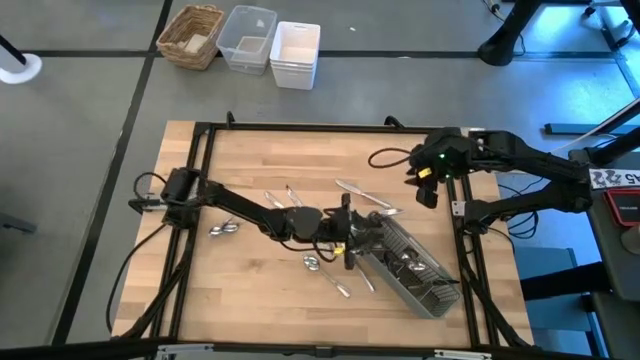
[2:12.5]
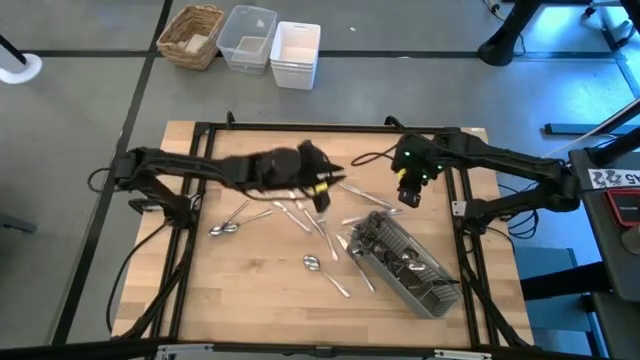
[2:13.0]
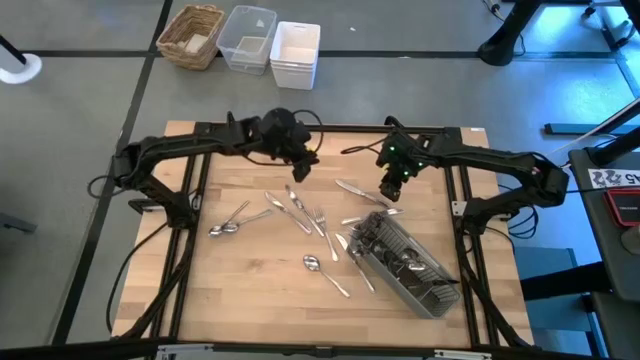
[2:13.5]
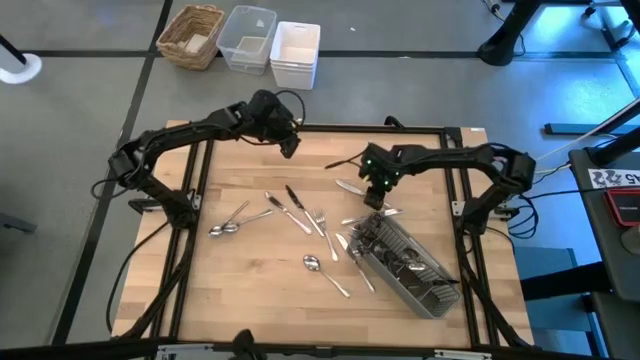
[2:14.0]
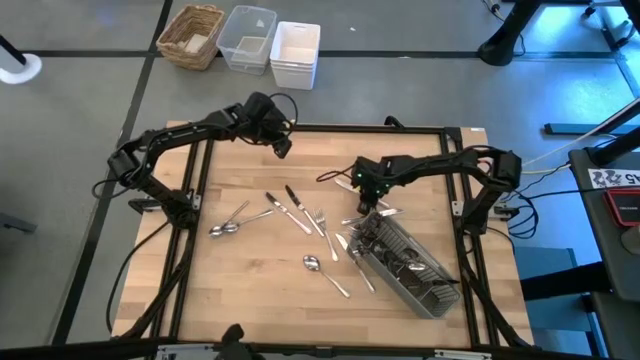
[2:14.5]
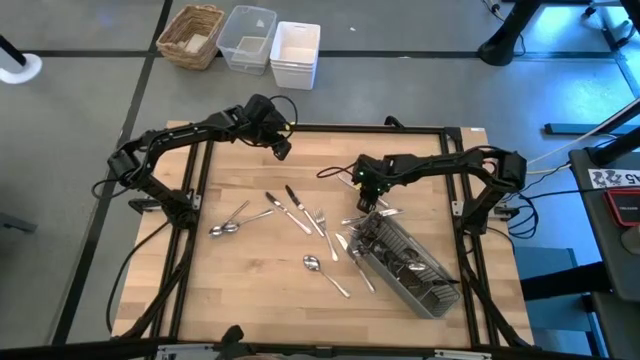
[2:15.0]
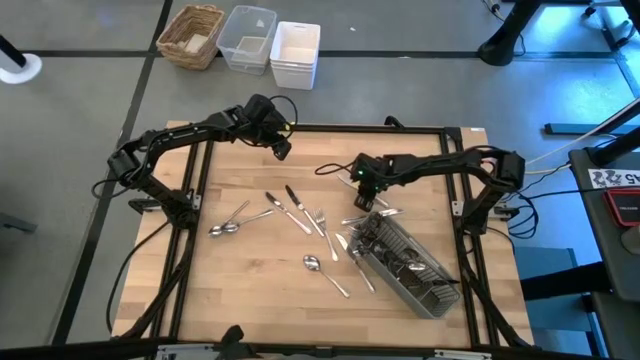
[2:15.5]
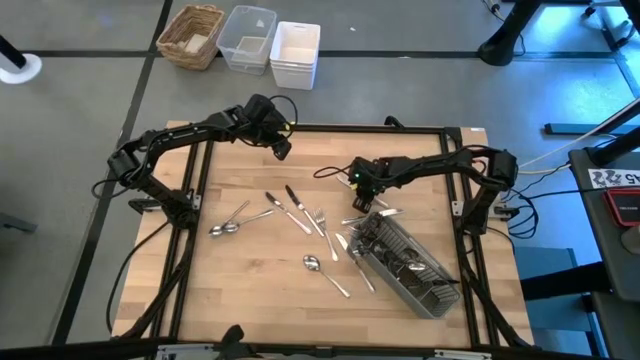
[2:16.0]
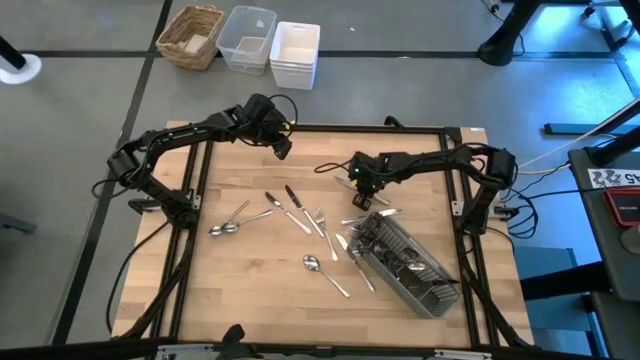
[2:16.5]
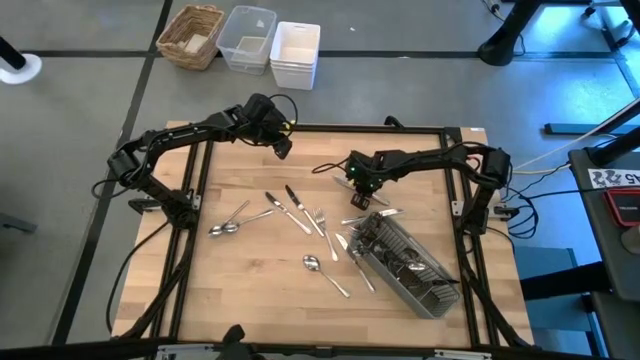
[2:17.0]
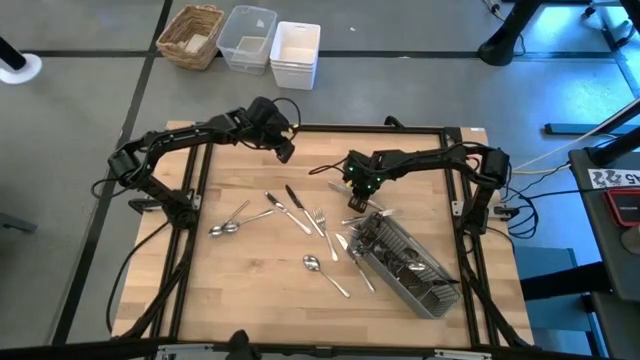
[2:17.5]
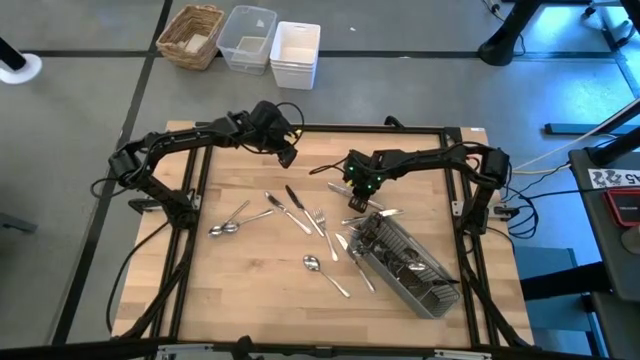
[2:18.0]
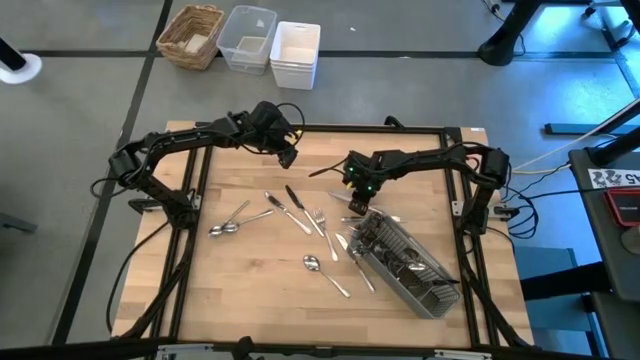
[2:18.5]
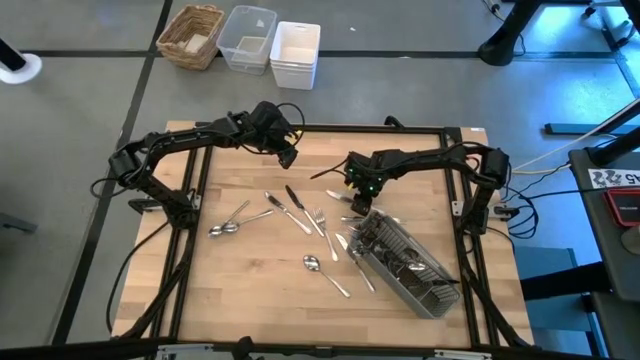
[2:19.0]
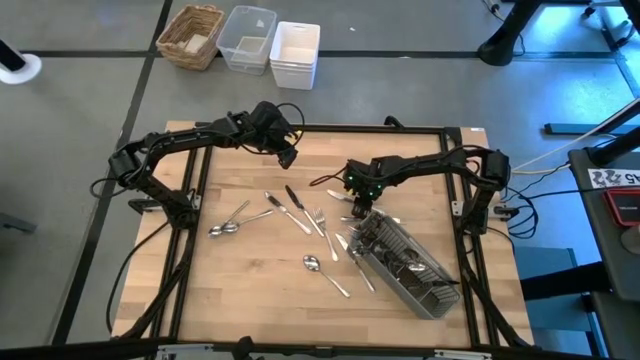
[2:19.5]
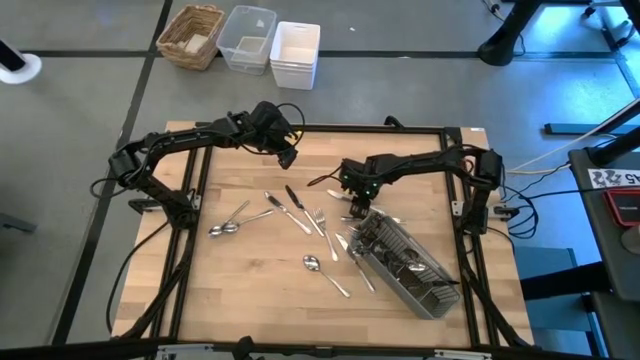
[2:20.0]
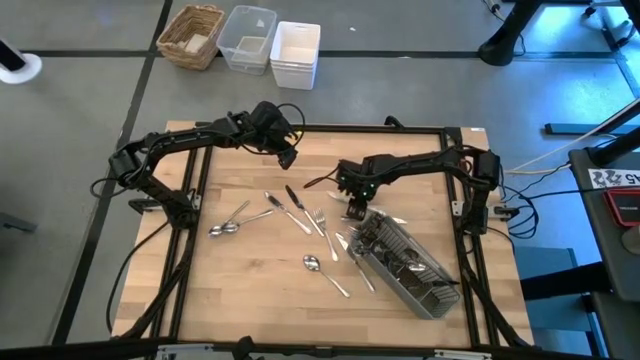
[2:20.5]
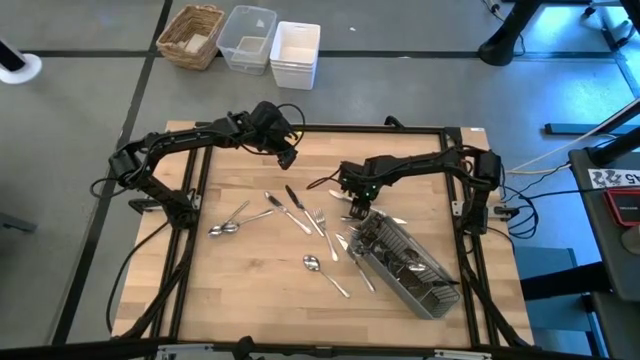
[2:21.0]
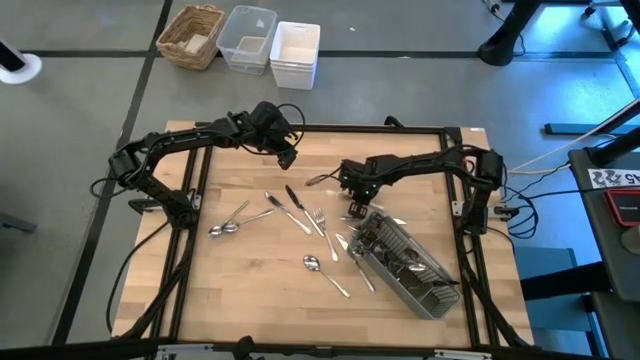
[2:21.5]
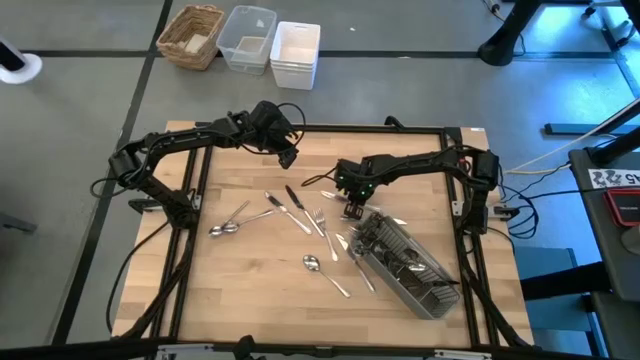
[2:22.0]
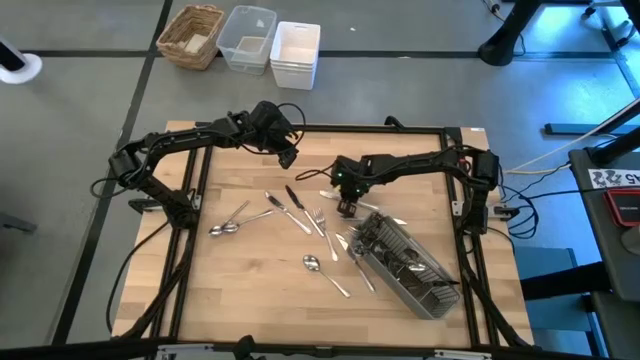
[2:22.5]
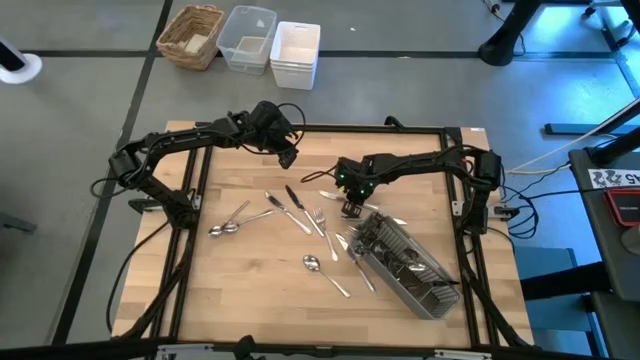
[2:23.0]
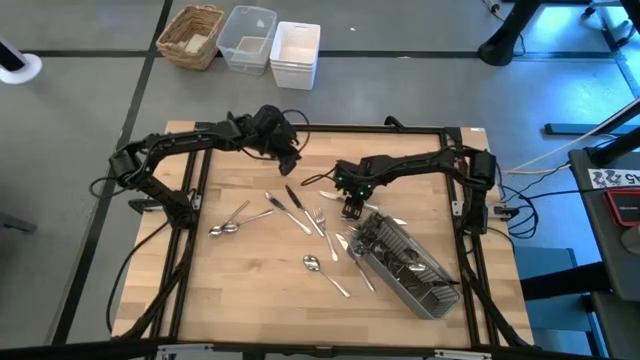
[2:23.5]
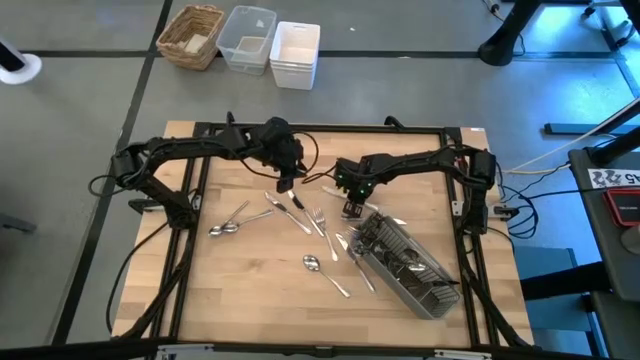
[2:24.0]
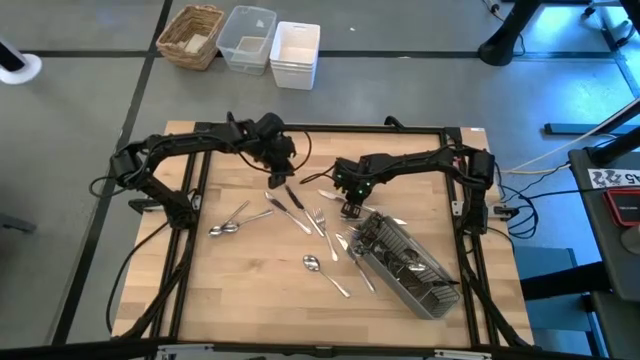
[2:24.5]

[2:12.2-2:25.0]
Task: Sort silverware
Put the silver table knife into the gray silverware basket

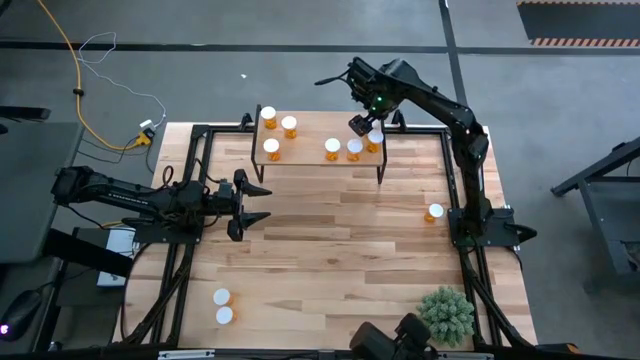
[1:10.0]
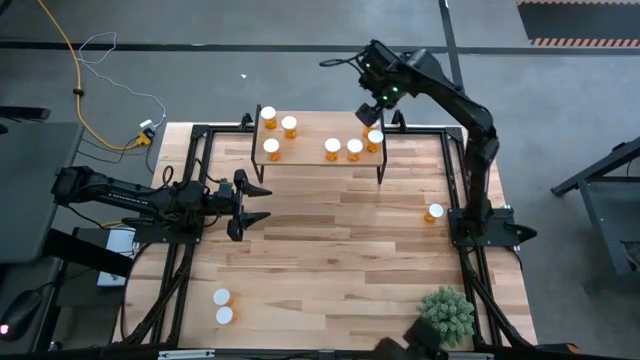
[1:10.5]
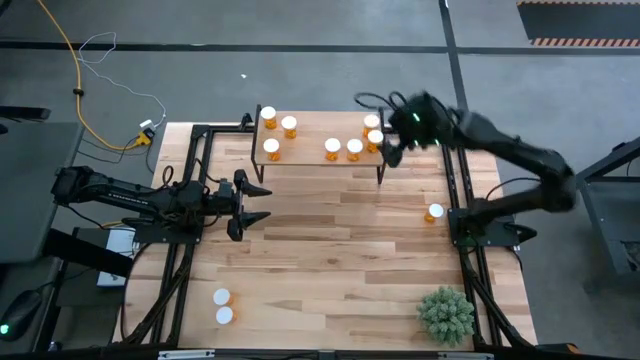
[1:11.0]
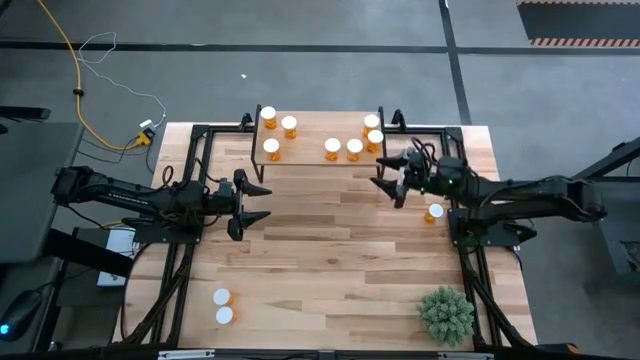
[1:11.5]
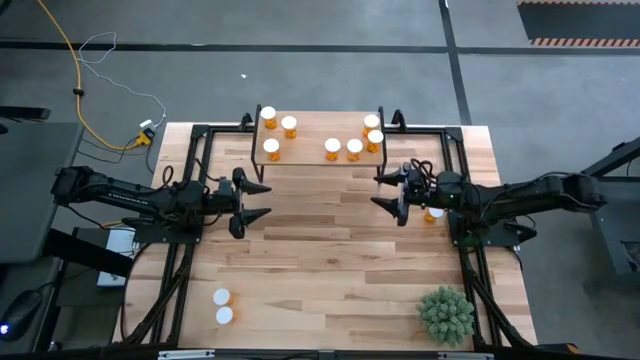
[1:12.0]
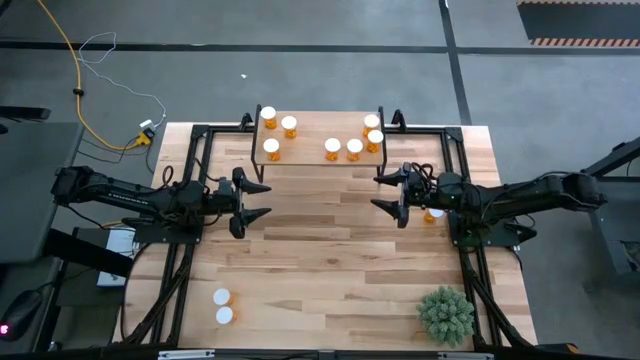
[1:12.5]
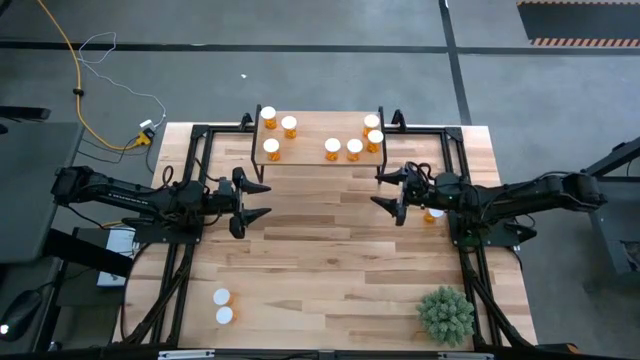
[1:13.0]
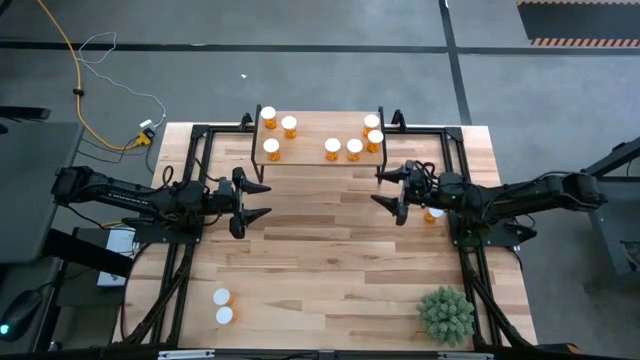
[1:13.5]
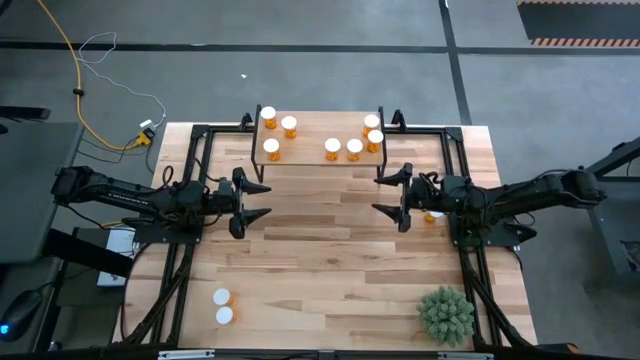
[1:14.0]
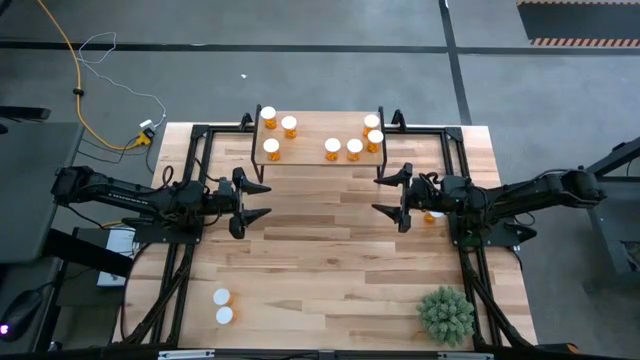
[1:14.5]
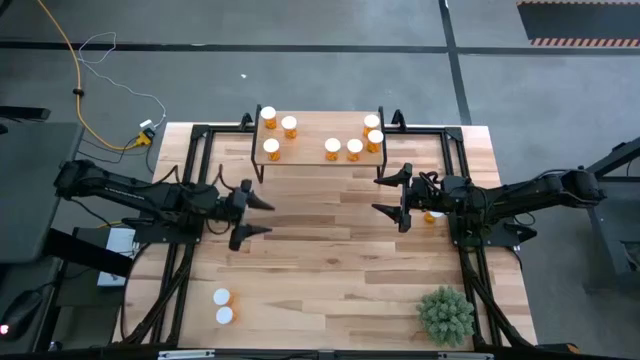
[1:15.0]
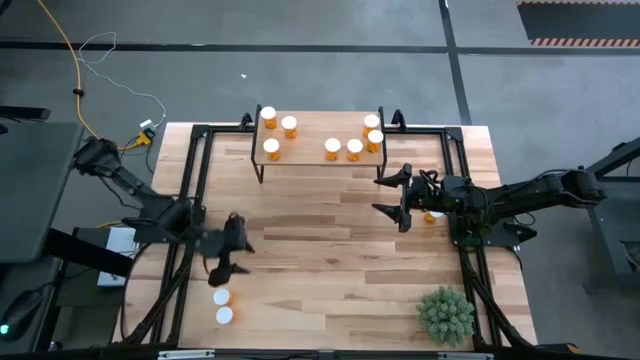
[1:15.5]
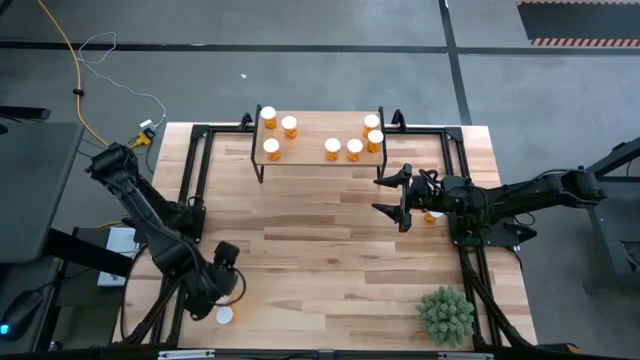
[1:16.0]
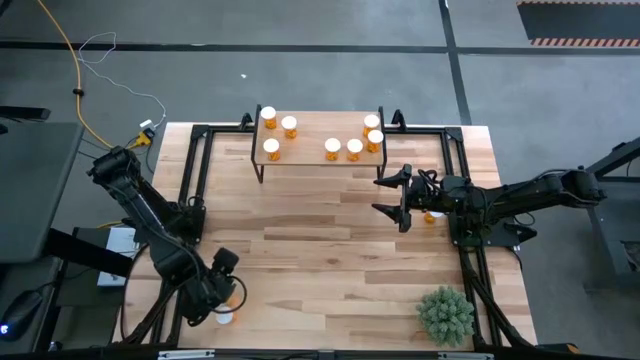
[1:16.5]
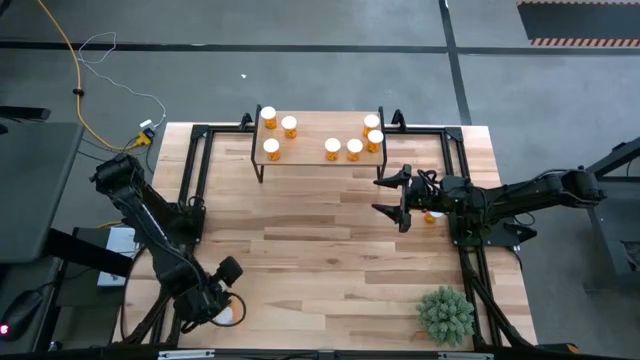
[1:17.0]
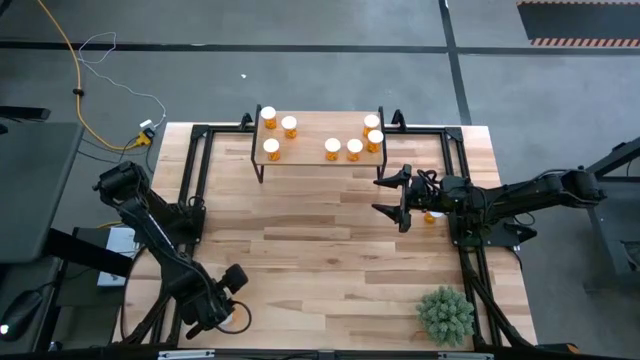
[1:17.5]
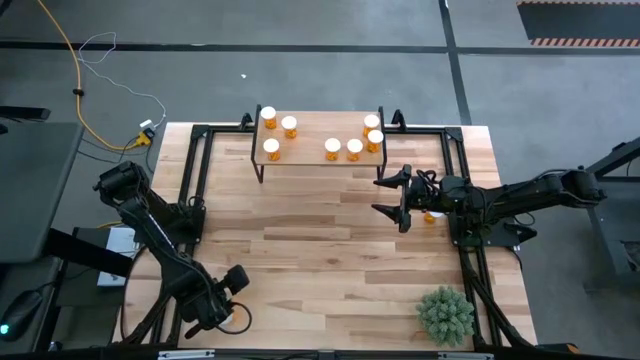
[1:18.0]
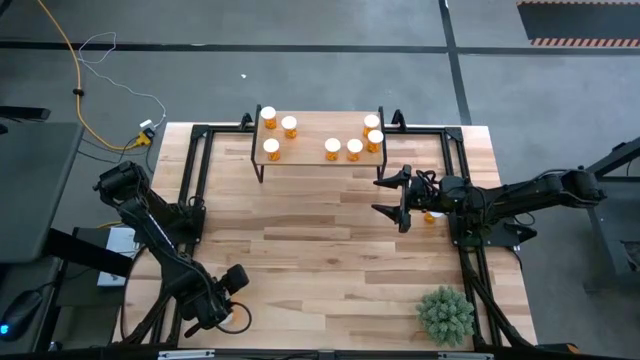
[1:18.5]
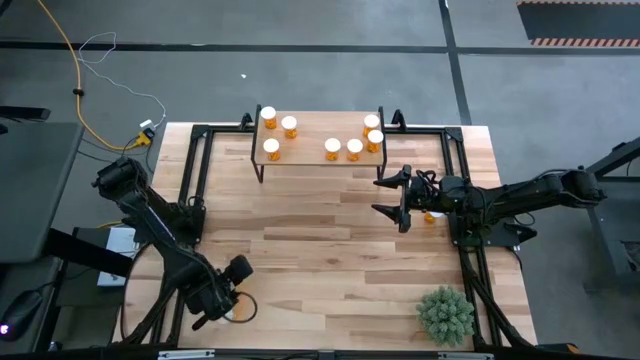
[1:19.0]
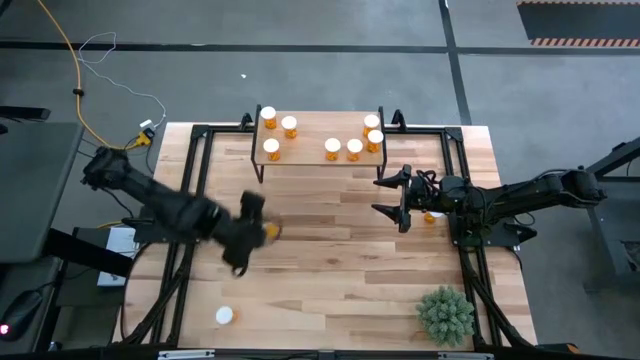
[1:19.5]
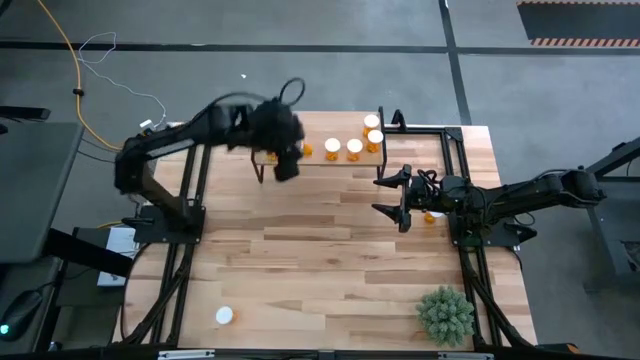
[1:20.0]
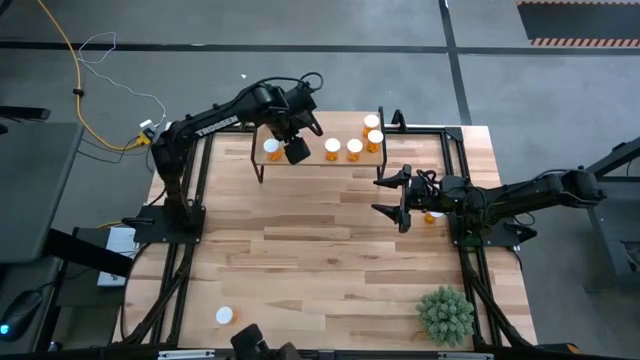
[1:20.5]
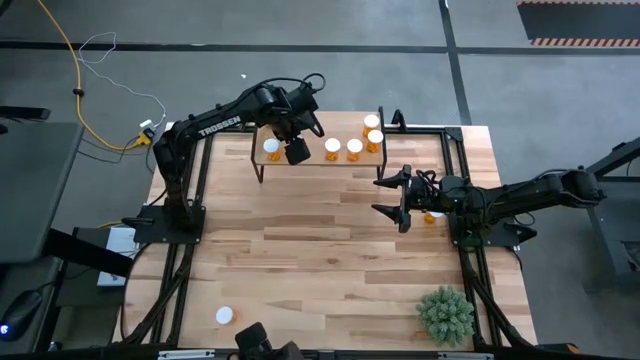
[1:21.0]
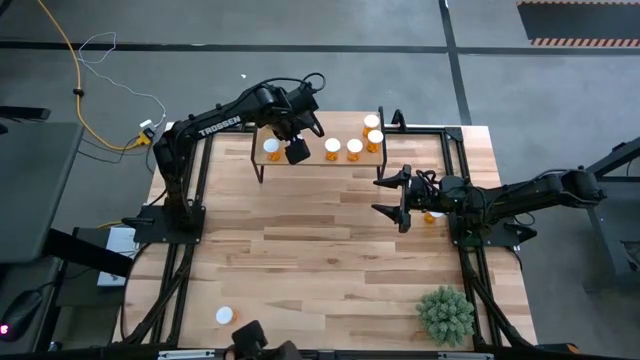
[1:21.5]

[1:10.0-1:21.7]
Task: Pick and place medicine bottles onto shelf by color
Put the orange pill bottle on the shelf
